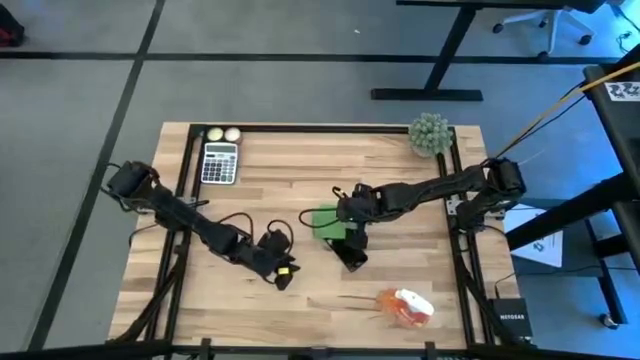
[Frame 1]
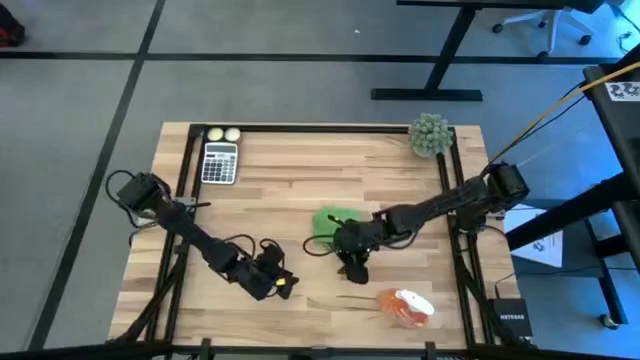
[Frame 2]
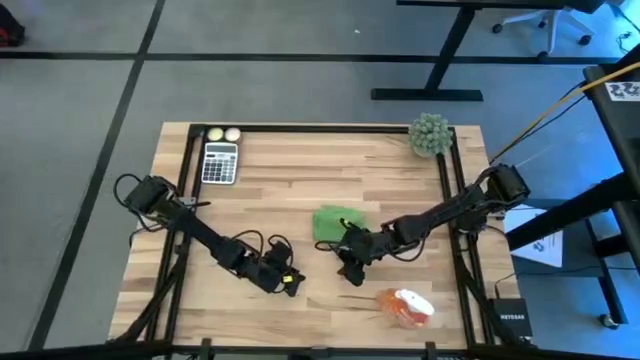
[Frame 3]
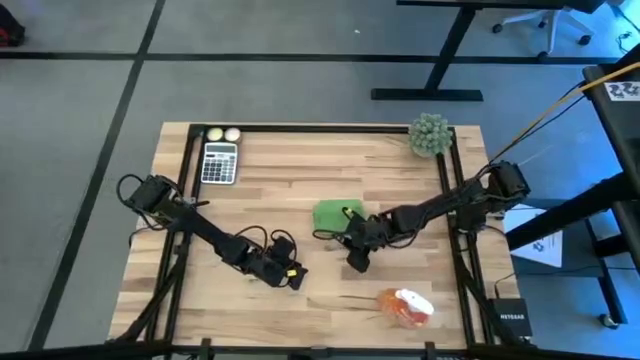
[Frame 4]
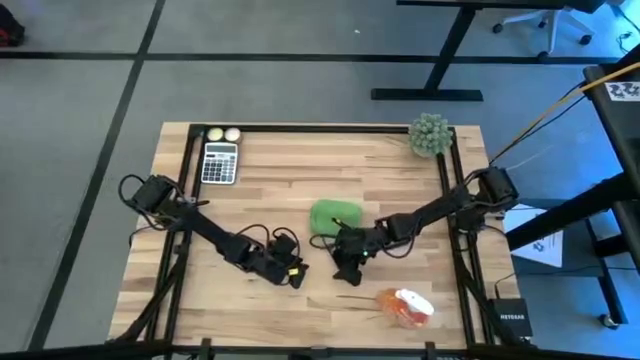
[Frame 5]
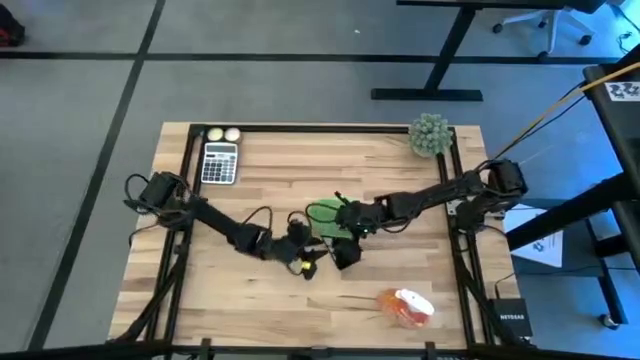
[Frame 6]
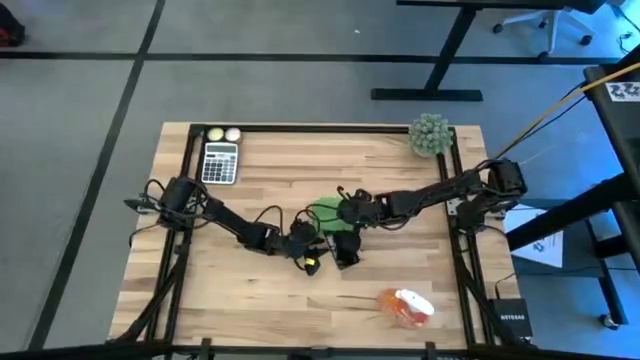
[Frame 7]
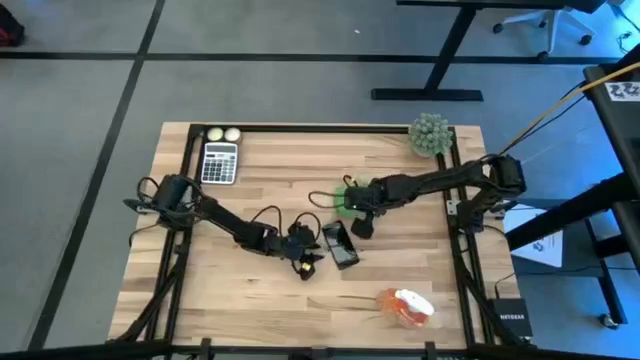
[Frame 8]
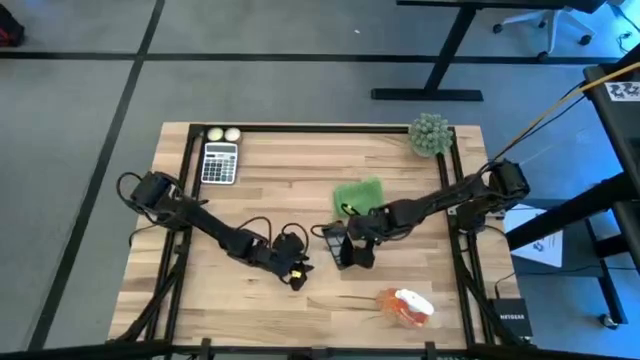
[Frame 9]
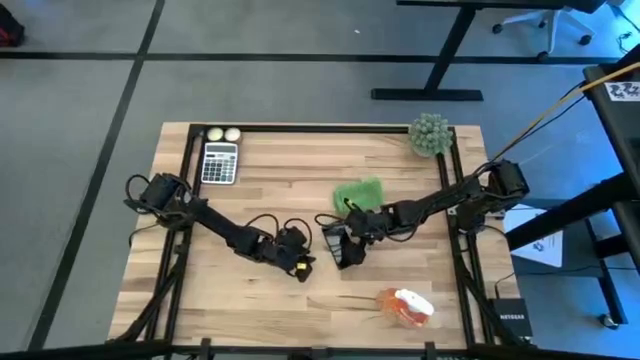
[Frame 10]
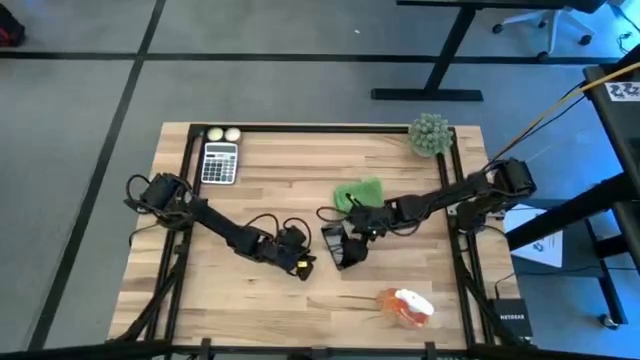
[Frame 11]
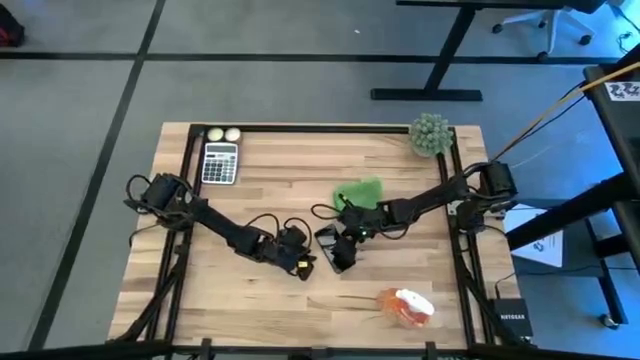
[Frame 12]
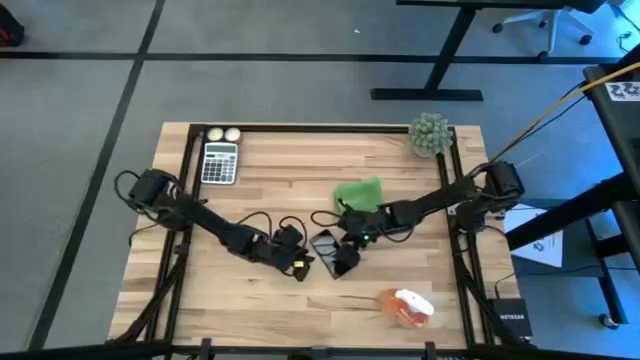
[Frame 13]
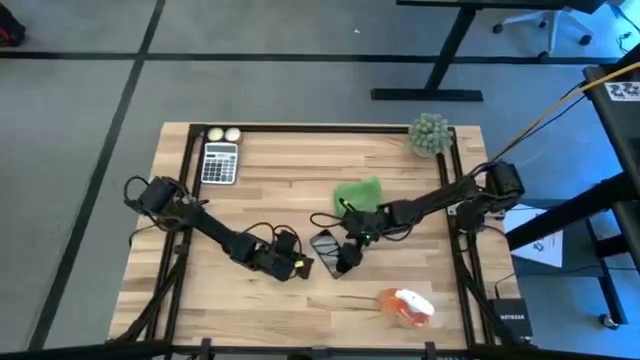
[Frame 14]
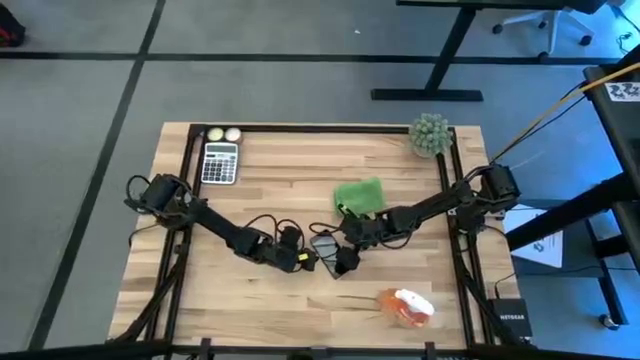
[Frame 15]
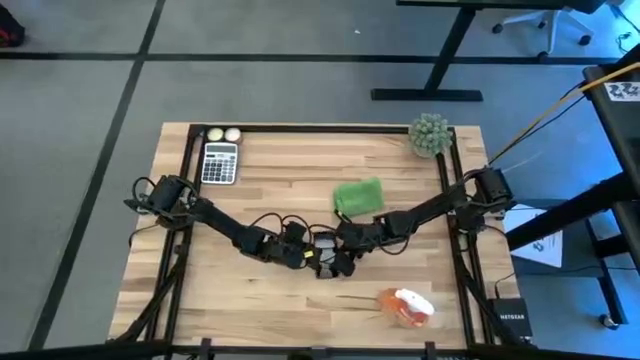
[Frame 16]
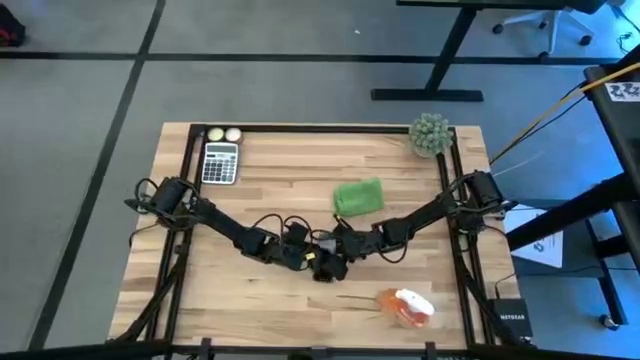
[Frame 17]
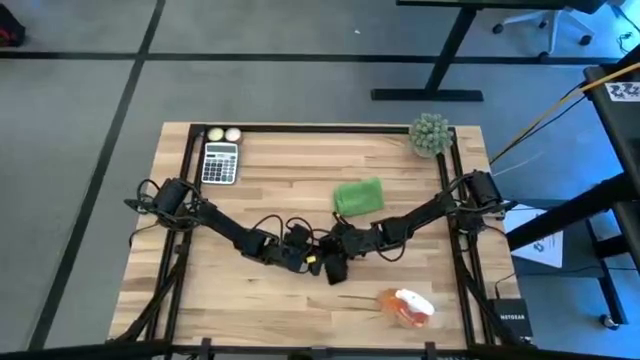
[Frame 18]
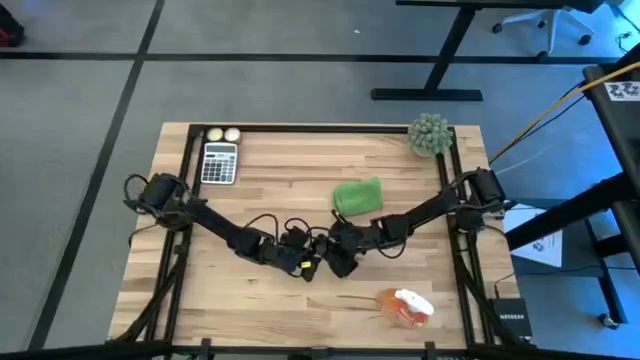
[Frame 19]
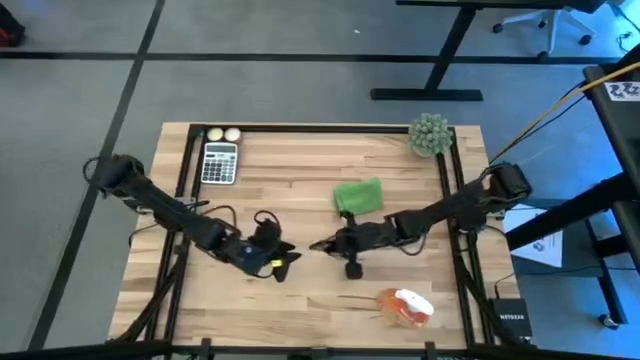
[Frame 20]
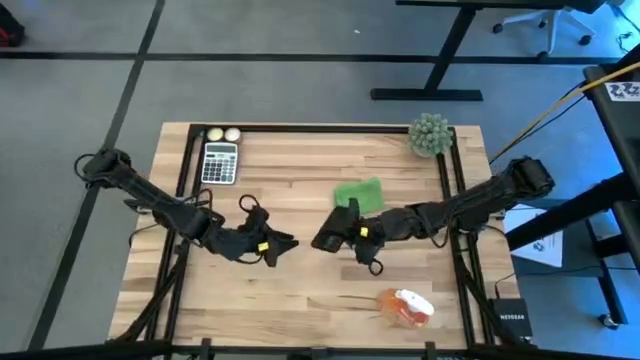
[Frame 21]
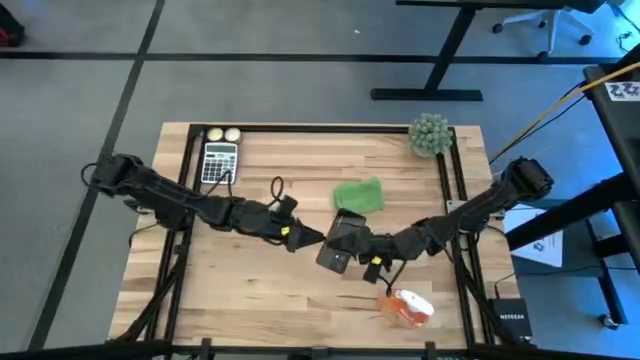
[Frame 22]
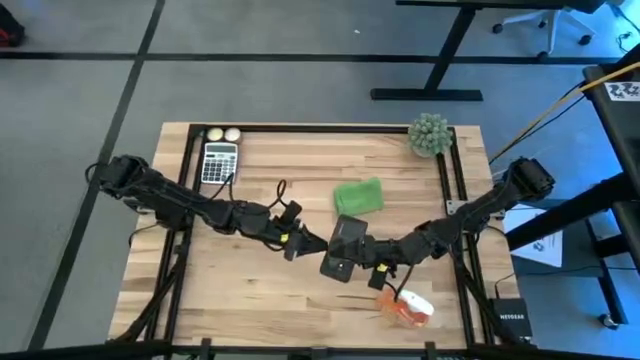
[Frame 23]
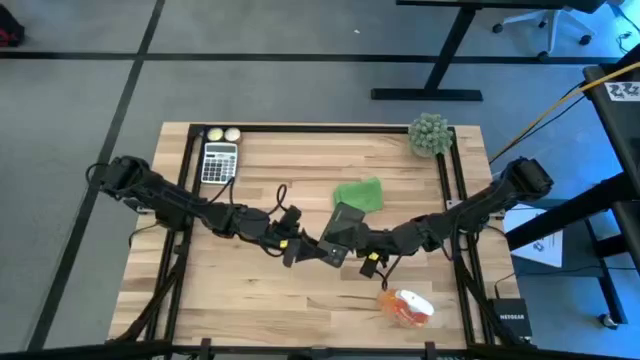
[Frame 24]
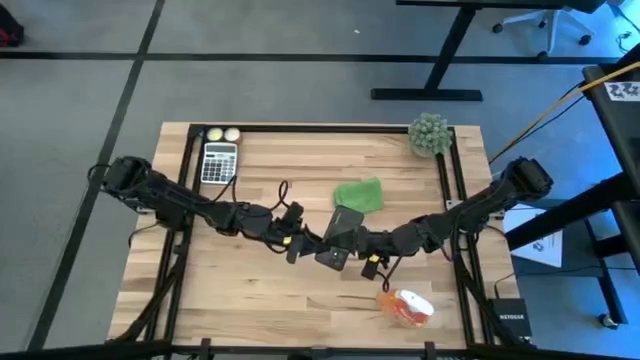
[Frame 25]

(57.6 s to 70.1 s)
Task: Apply microfiber cloth
Spray the black cellphone using the cleaning bottle

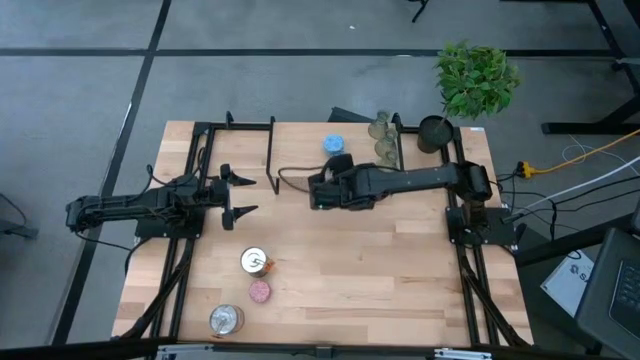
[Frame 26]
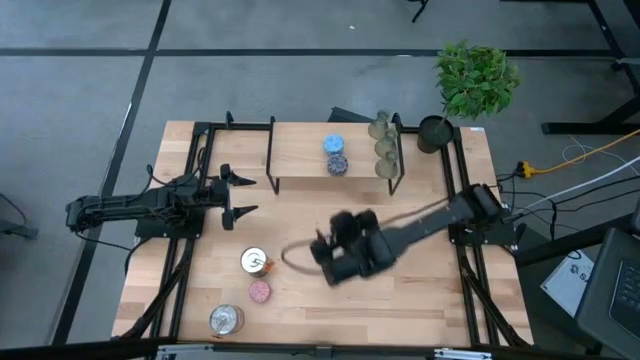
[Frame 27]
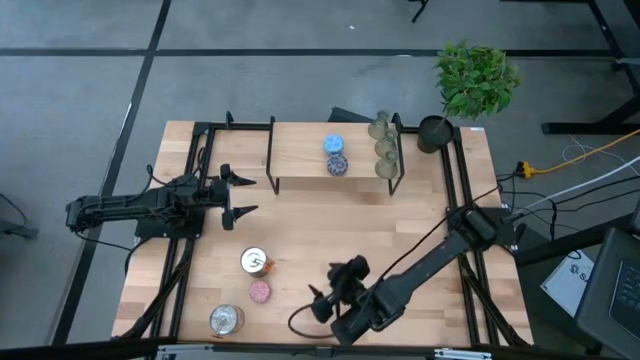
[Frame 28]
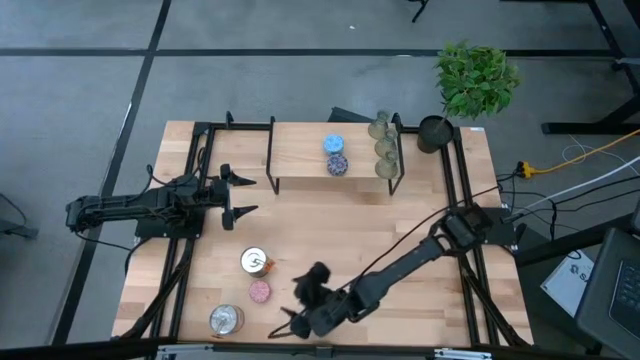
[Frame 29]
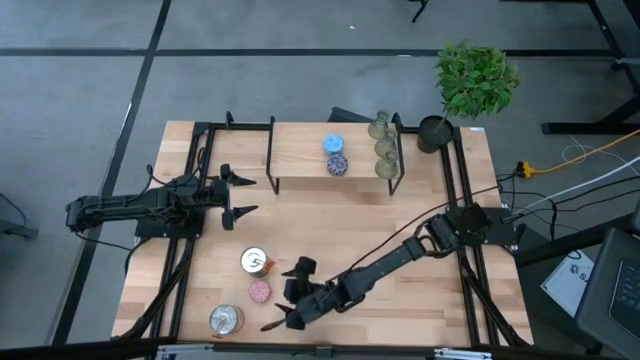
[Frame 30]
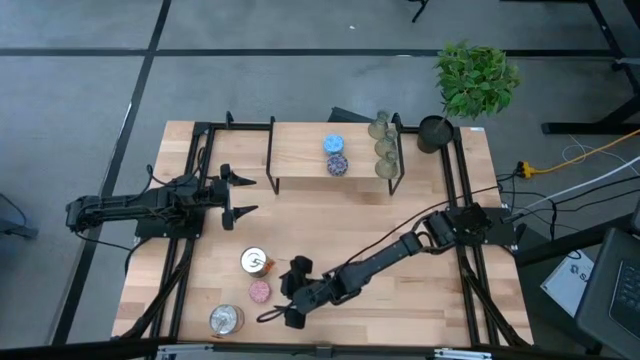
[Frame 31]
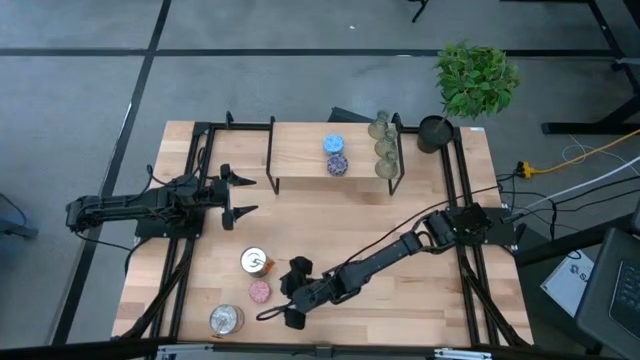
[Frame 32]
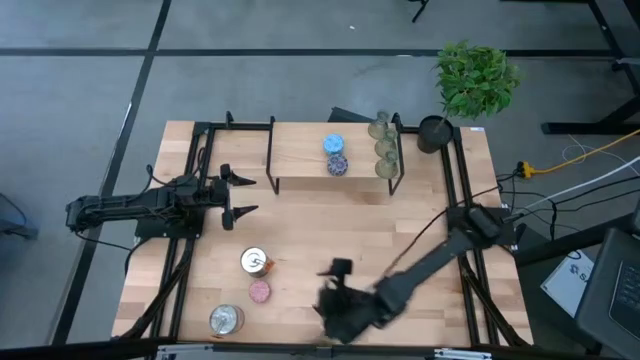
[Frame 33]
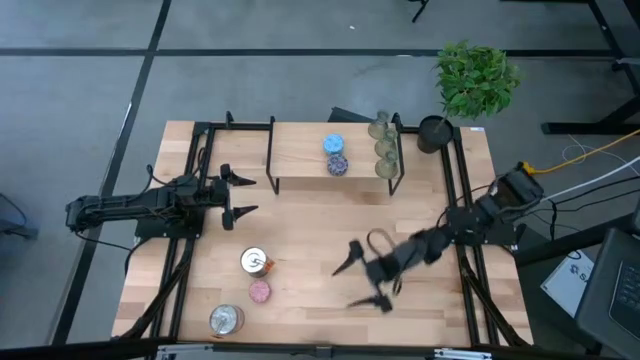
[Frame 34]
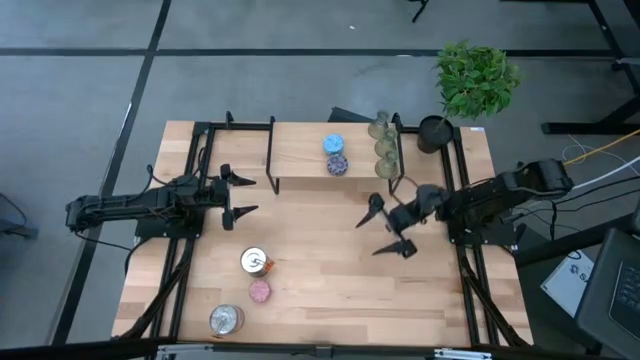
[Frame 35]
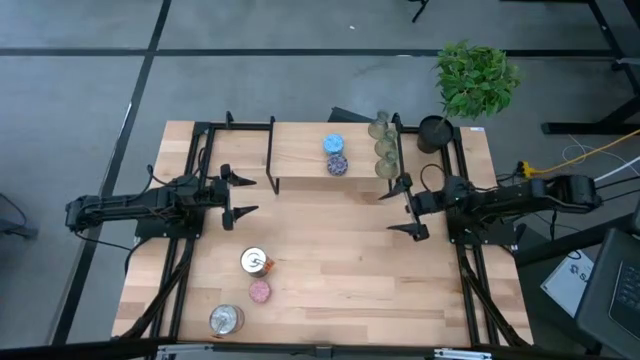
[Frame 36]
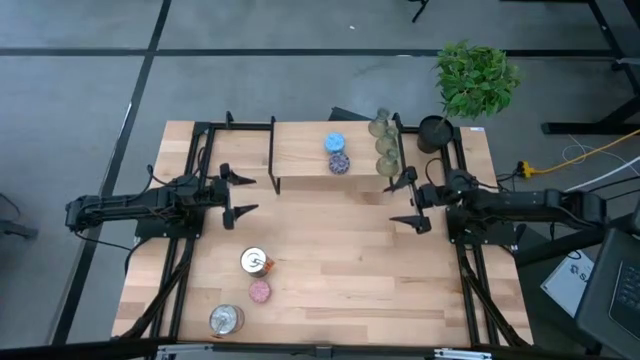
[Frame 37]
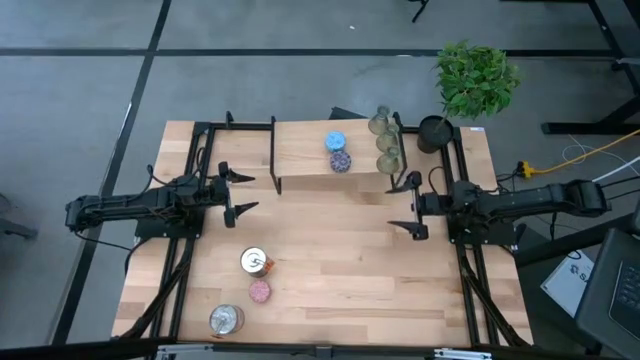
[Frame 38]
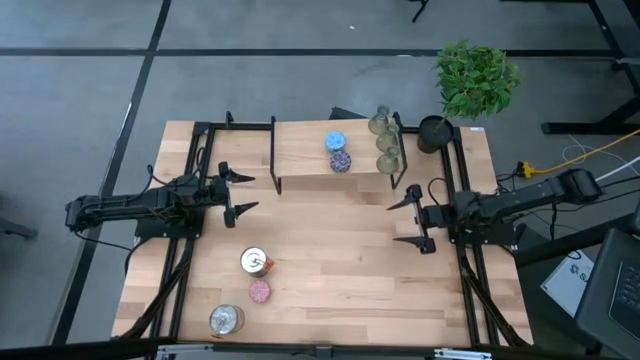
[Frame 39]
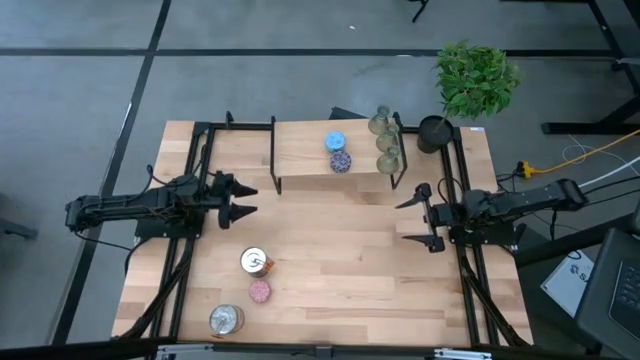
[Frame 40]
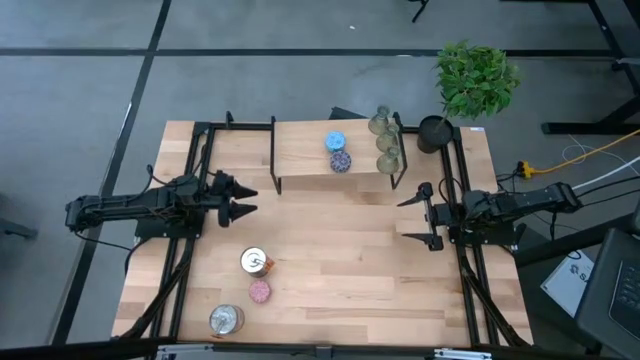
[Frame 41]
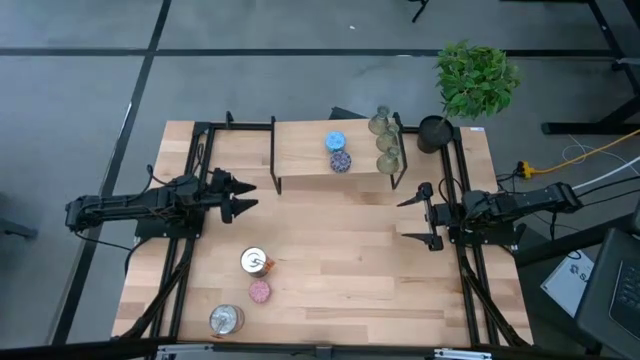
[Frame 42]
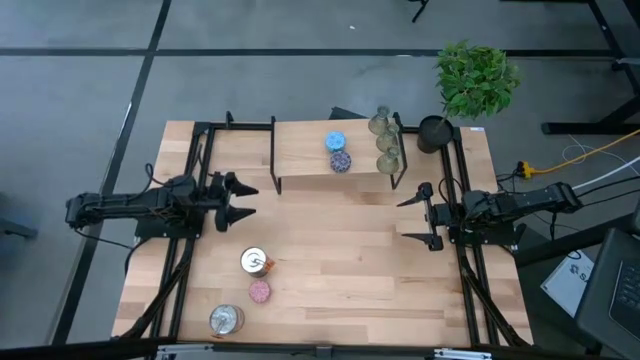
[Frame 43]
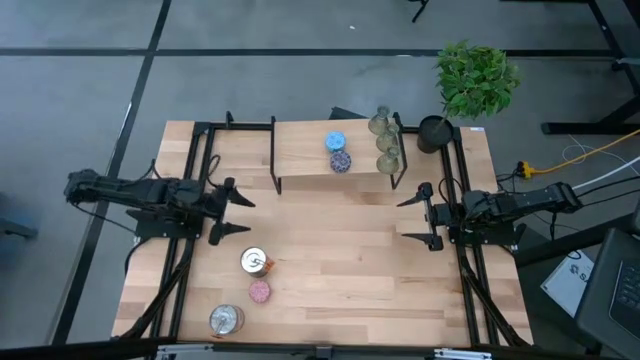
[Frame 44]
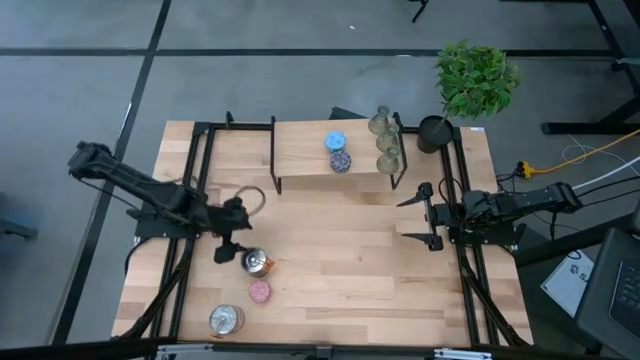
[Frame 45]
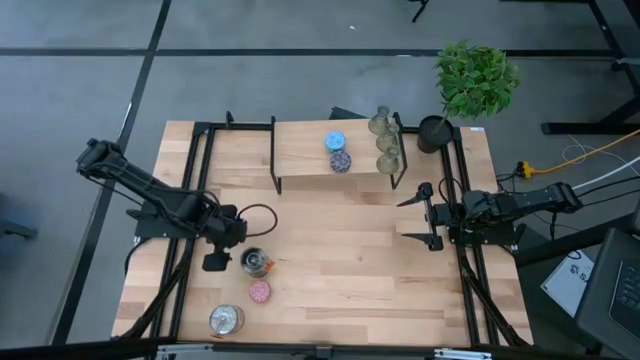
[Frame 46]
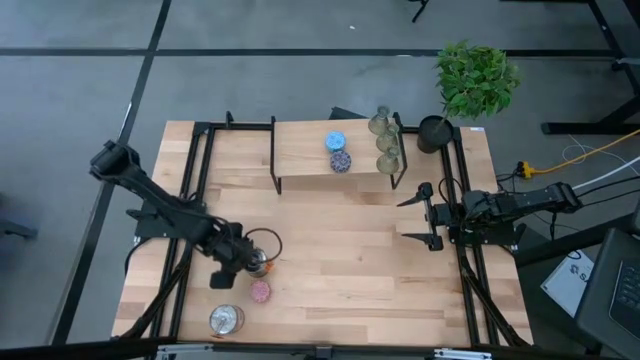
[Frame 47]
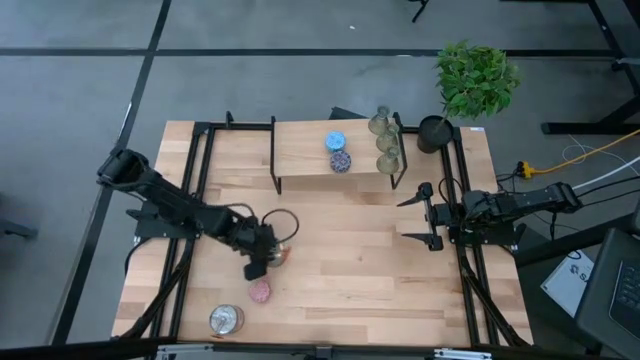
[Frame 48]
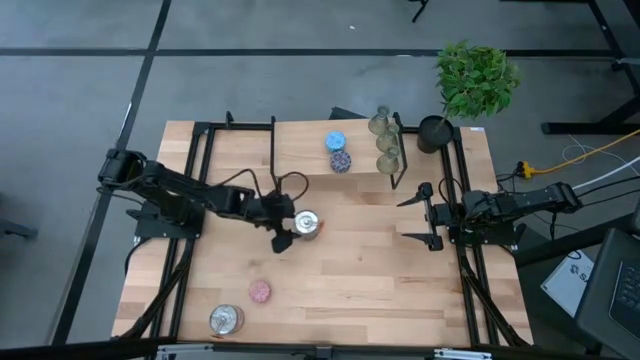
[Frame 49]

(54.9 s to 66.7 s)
Task: Pick & Place candle stick holders
Move the top silver scented candle to the center of the table
